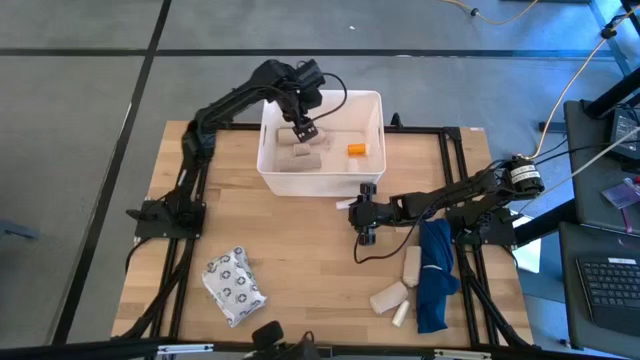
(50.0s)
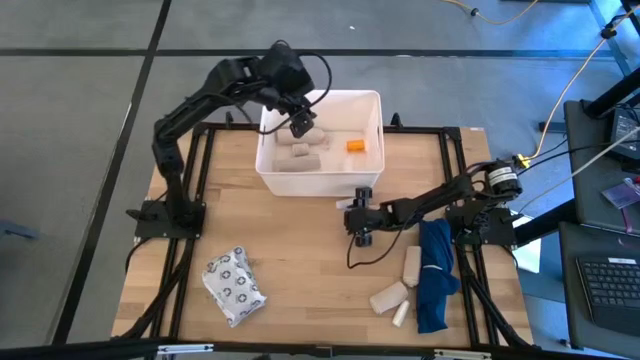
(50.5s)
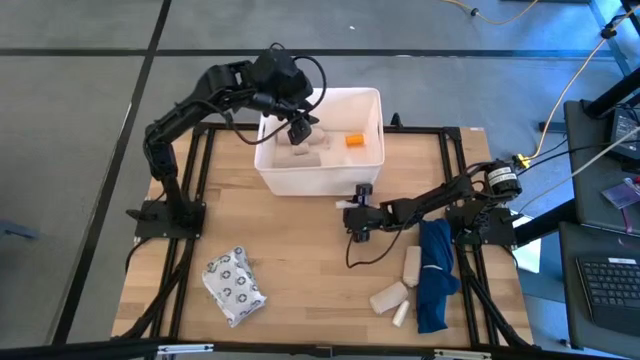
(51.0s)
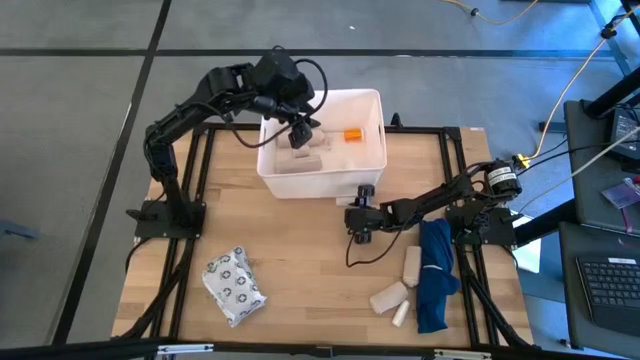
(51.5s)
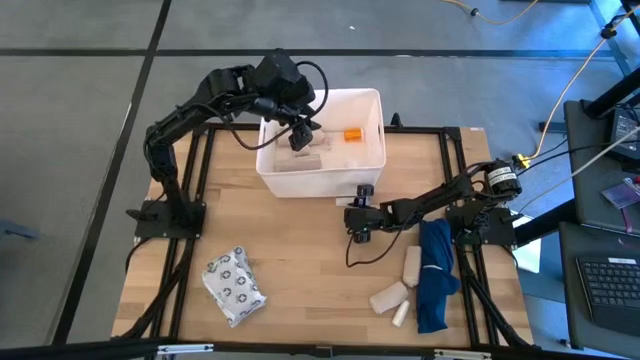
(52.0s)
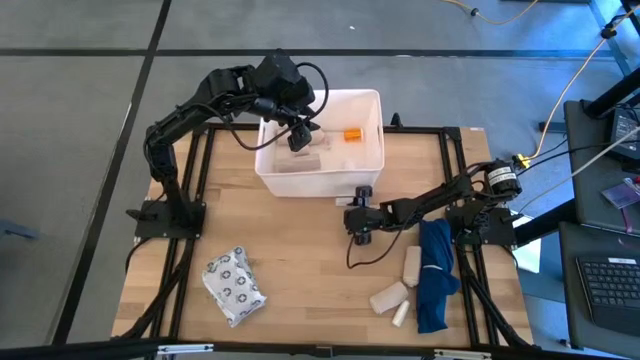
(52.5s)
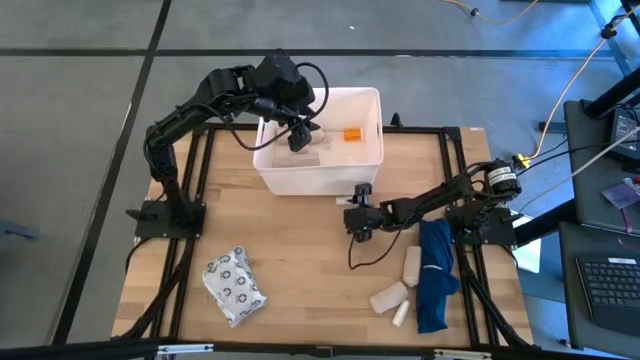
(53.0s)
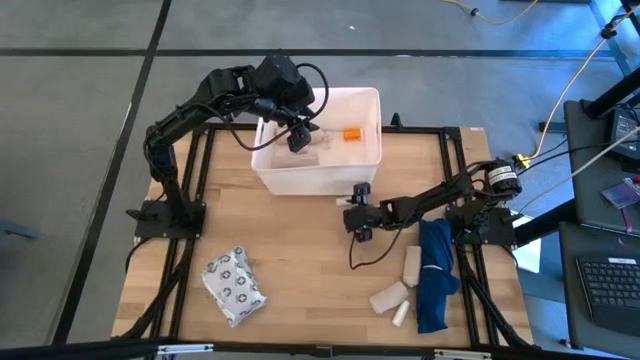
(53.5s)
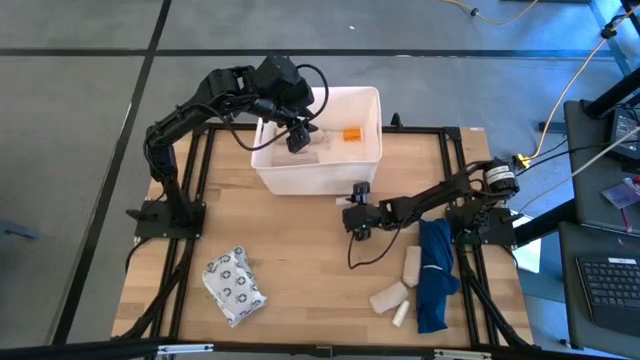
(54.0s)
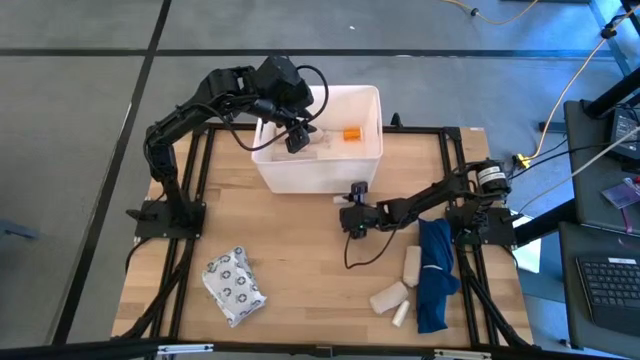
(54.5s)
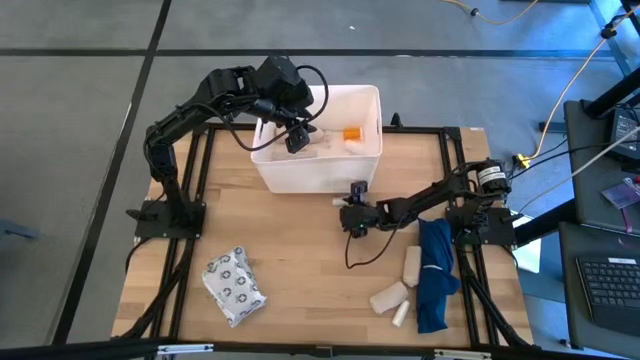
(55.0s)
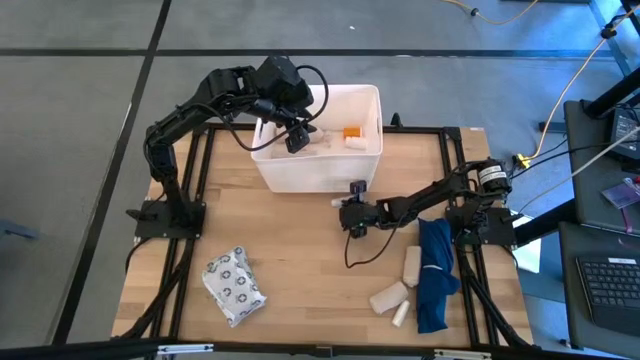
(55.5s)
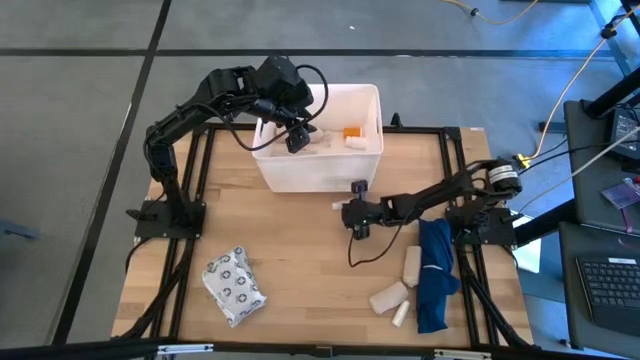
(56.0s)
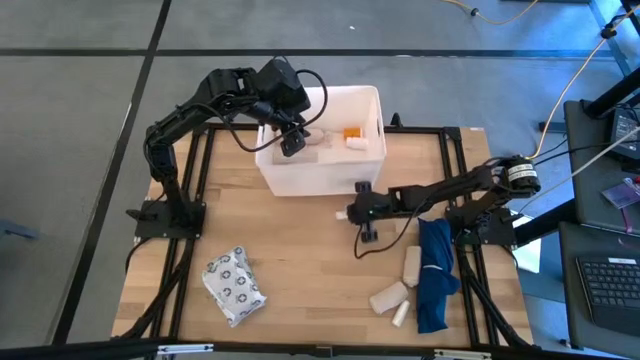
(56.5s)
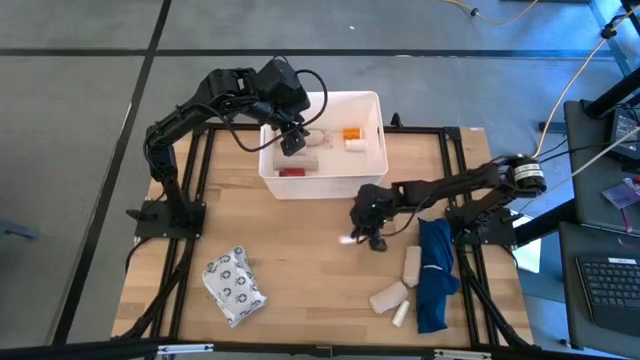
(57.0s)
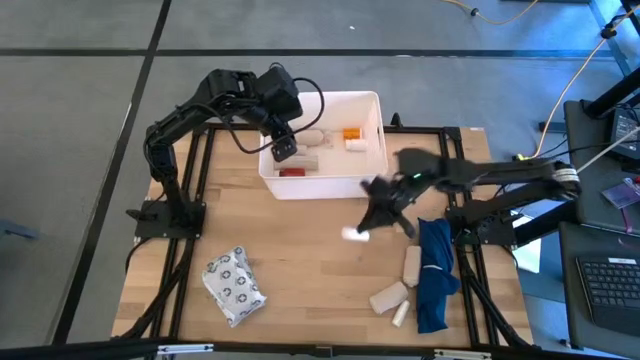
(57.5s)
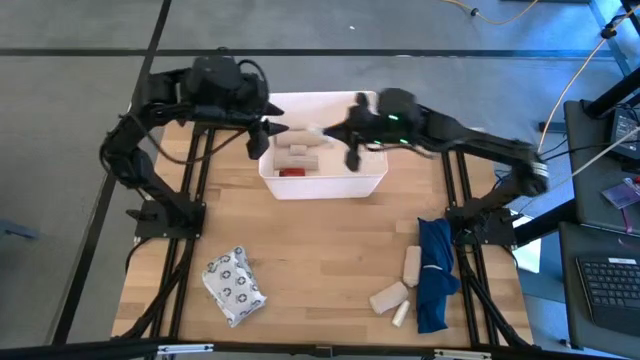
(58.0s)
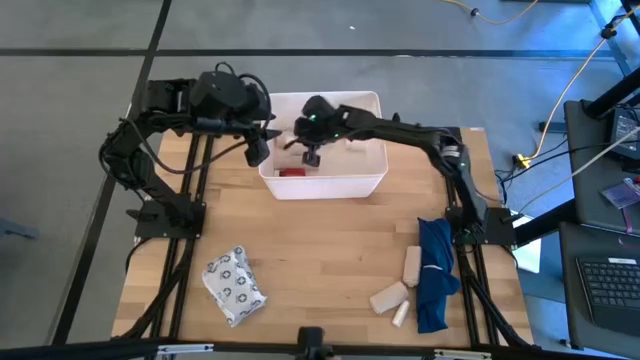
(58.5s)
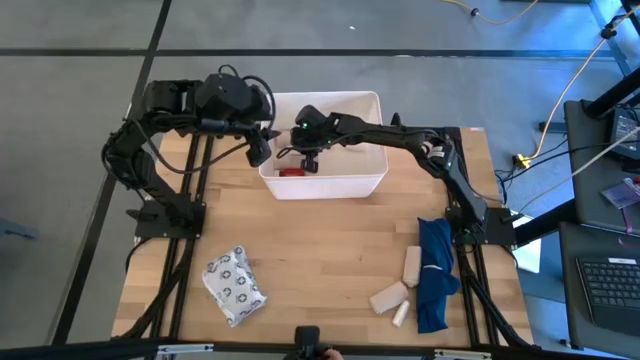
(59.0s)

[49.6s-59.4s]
Task: Pick & place medical supplies in basket/bin
Put the white rolled gauze into the white bin

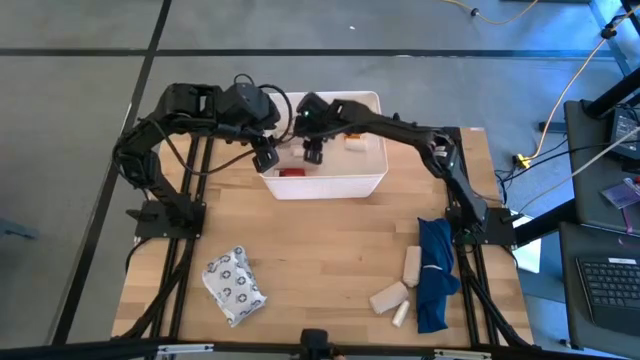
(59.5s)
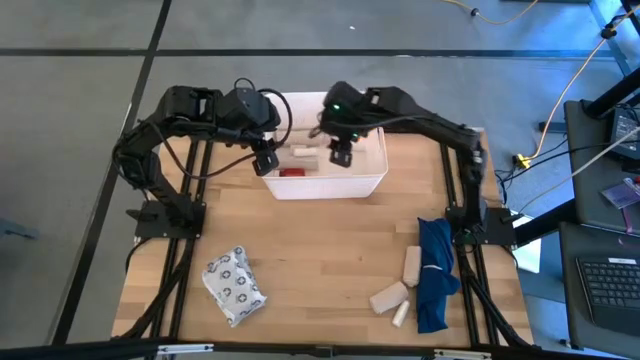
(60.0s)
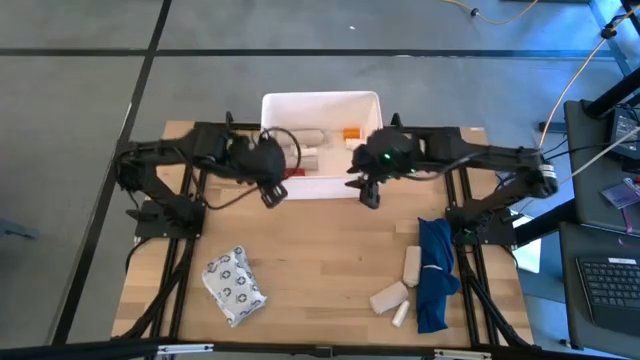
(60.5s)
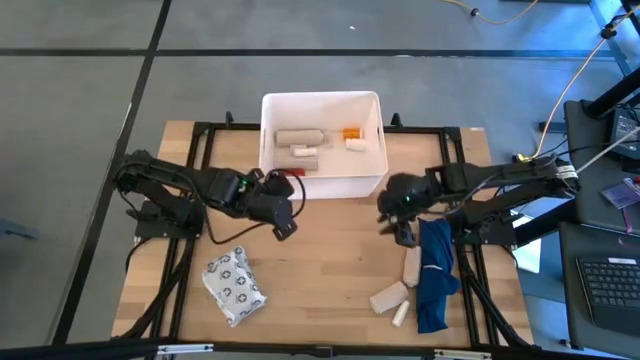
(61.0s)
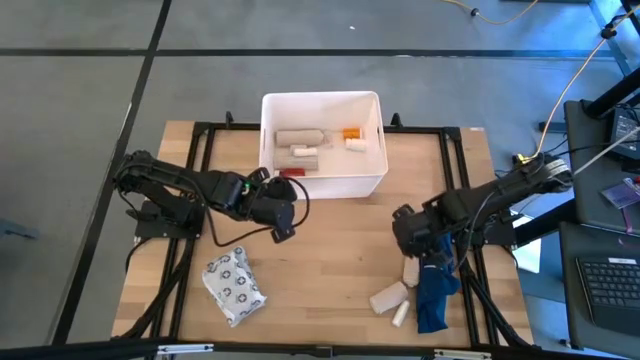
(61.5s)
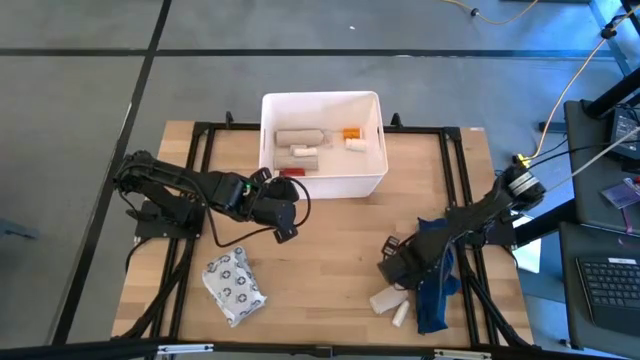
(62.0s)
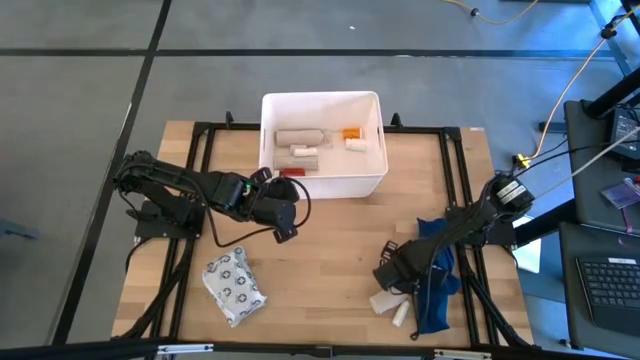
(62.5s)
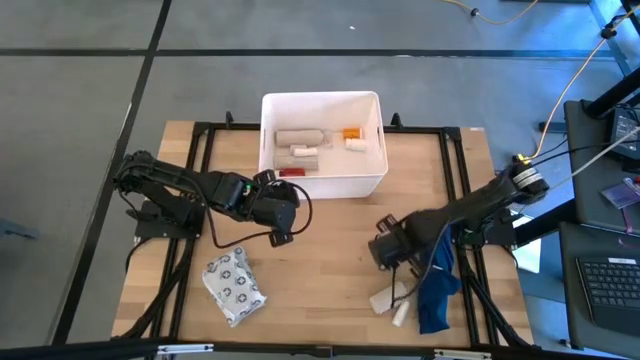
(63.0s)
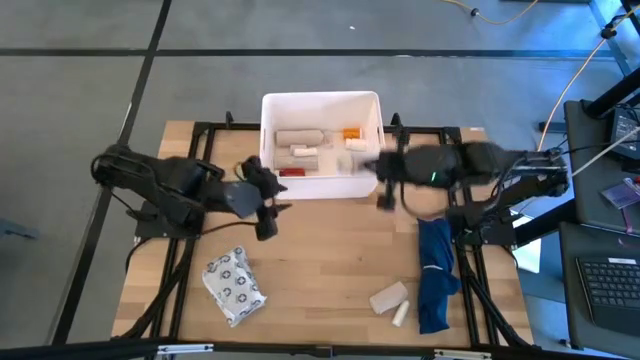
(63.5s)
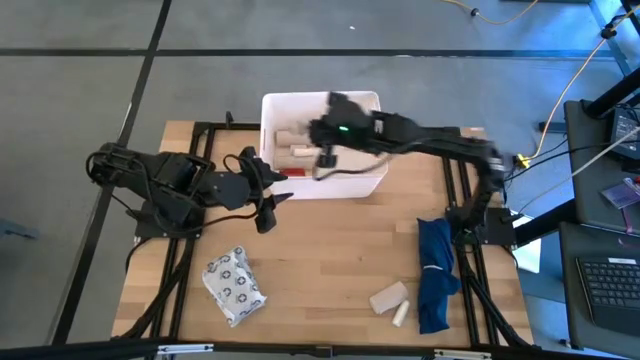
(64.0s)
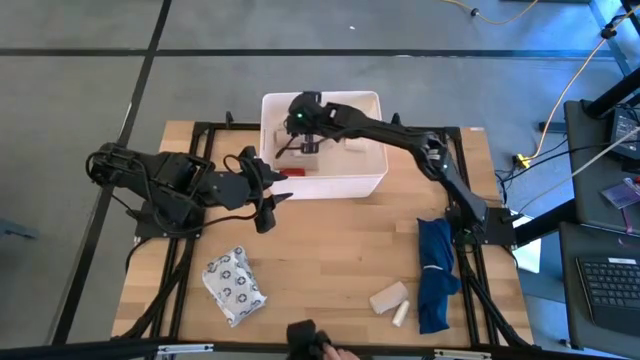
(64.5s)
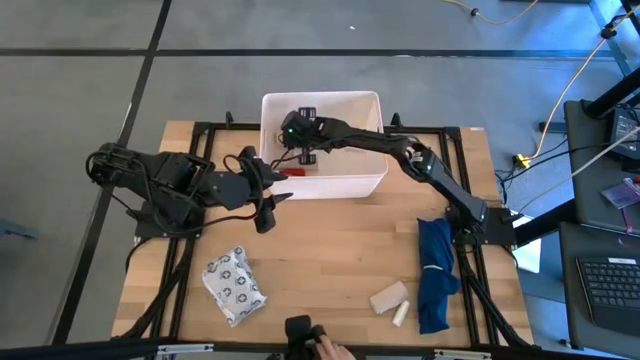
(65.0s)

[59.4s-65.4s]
Put the white bandage into the white bin

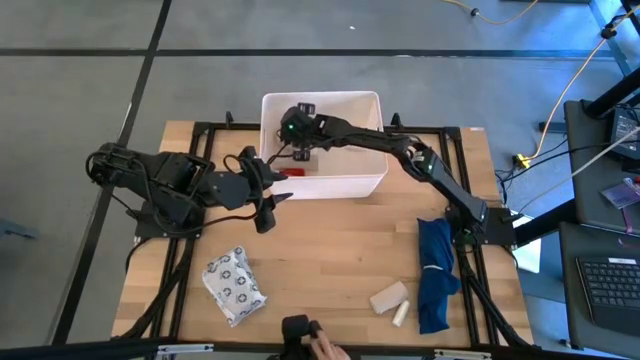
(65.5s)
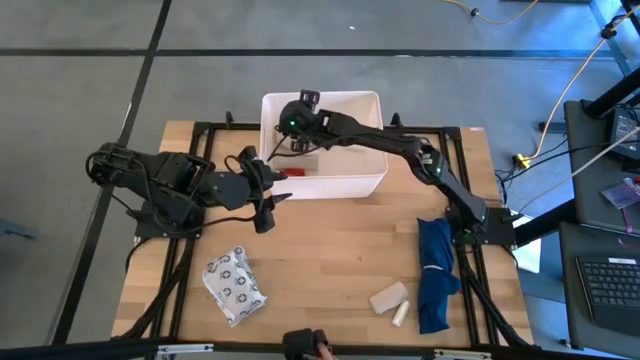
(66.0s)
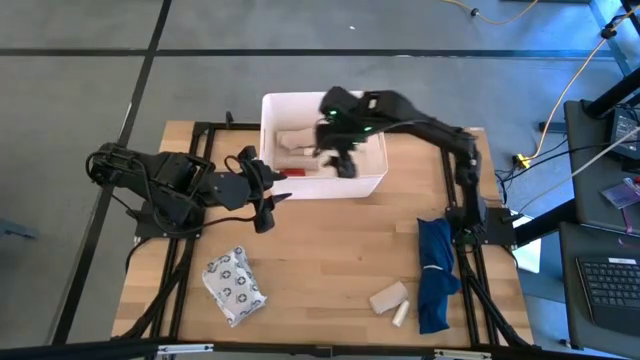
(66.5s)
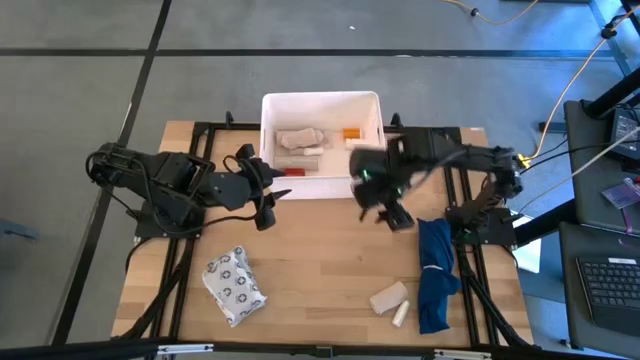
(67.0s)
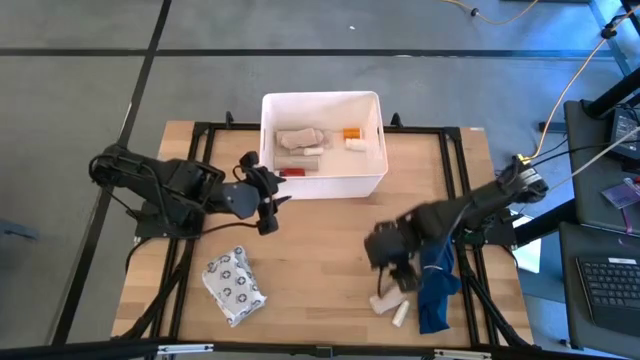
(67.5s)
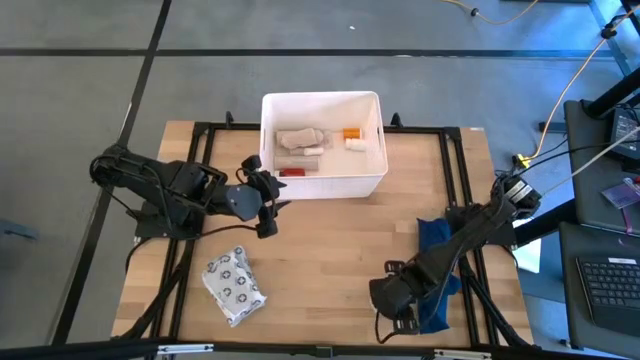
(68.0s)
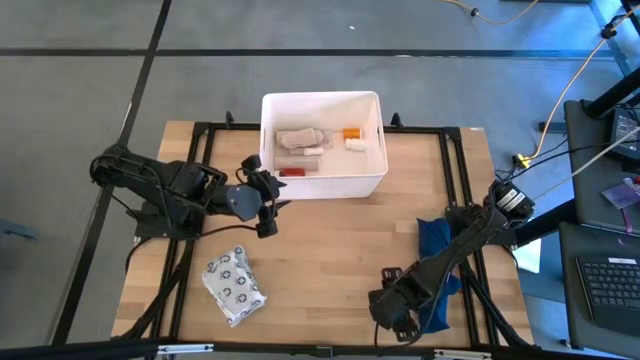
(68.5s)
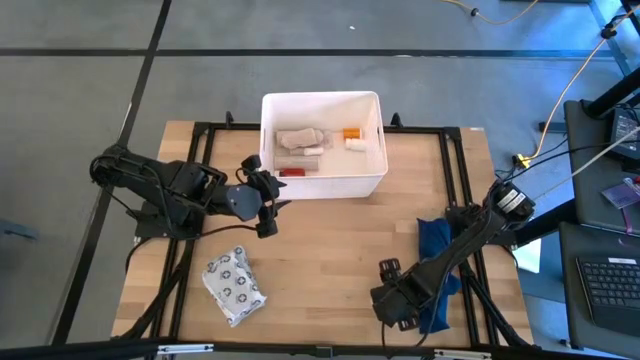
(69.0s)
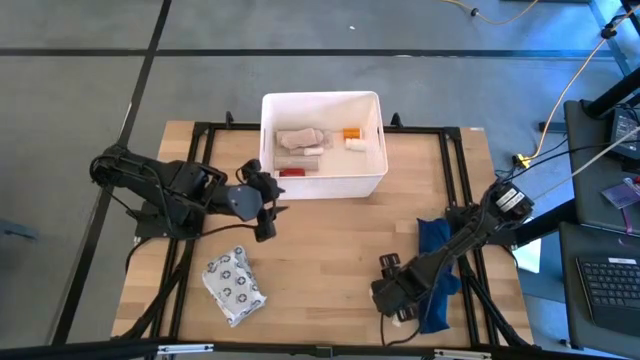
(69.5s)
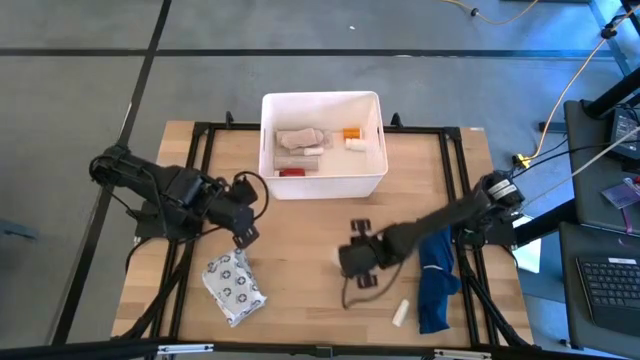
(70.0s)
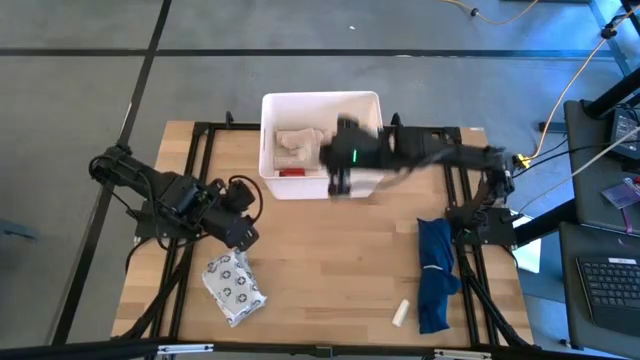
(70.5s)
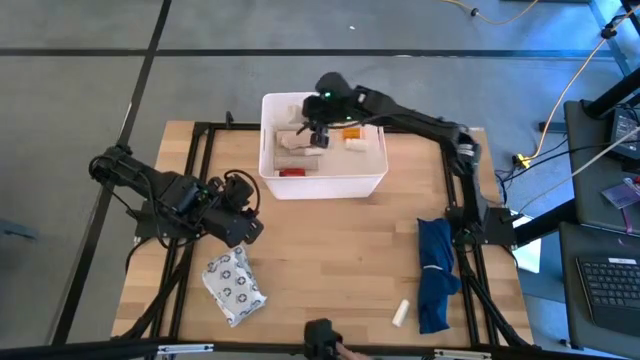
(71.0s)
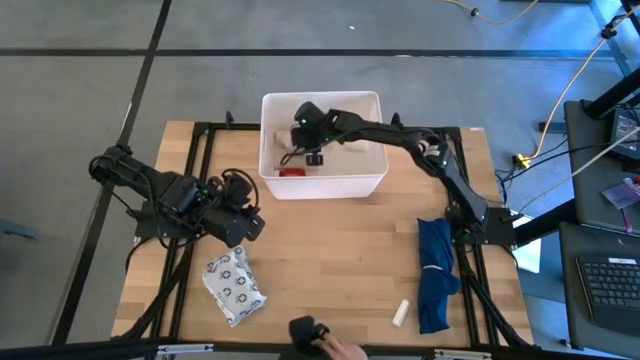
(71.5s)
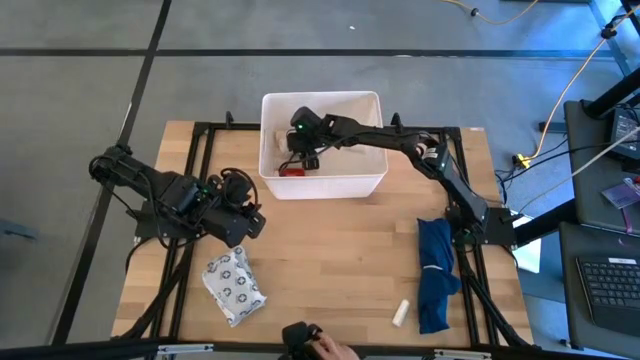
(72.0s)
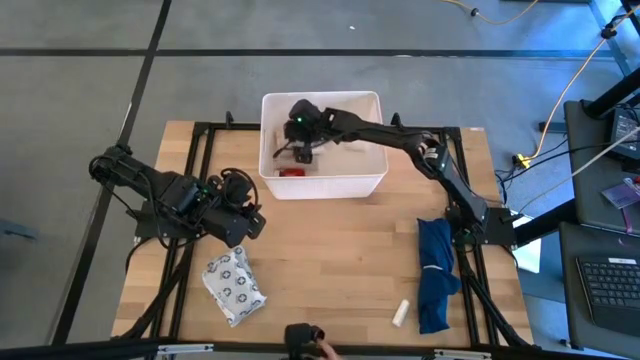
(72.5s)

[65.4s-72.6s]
Put the white bandage into the white bin
